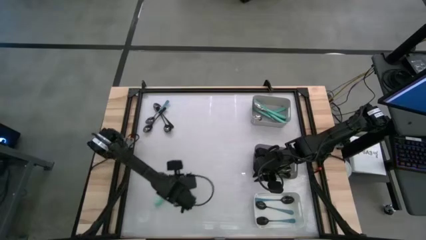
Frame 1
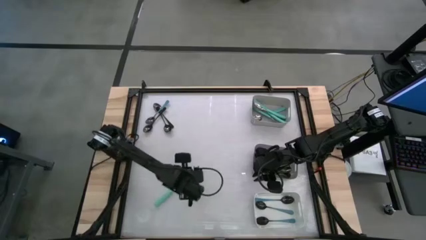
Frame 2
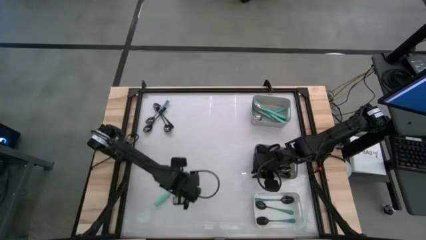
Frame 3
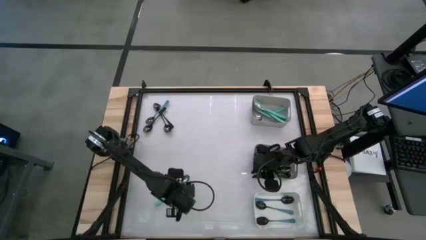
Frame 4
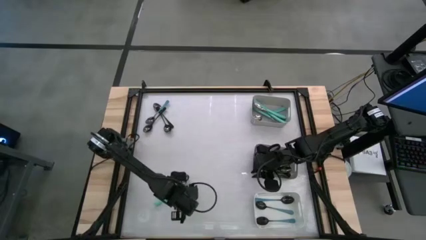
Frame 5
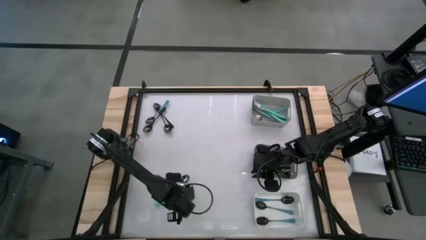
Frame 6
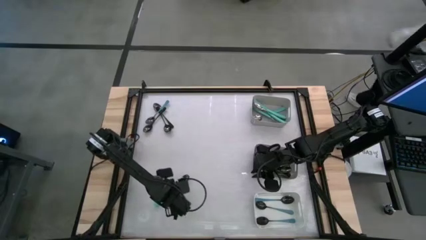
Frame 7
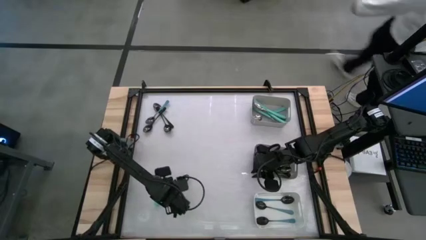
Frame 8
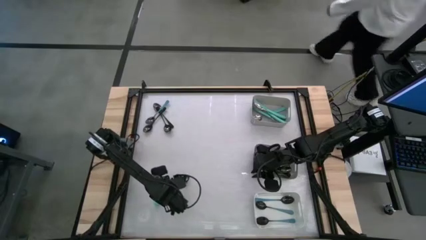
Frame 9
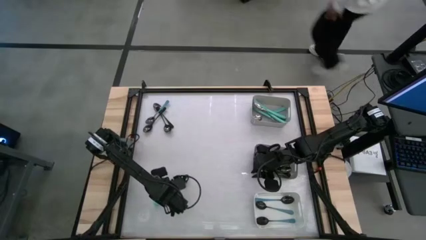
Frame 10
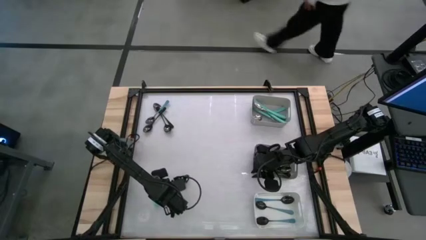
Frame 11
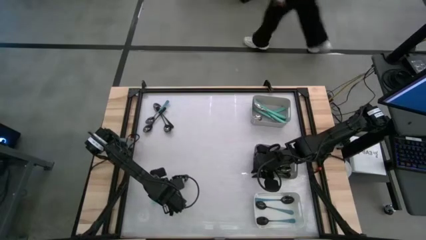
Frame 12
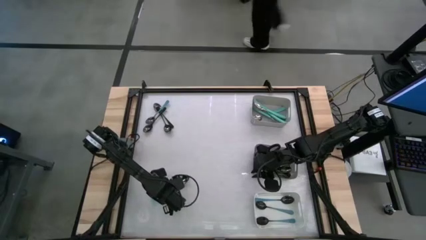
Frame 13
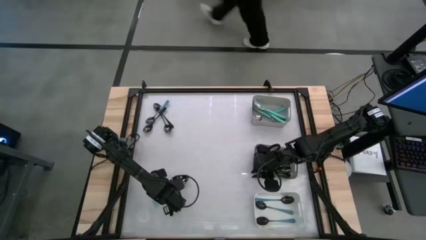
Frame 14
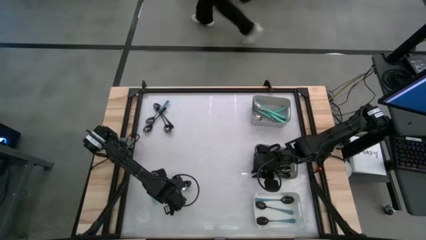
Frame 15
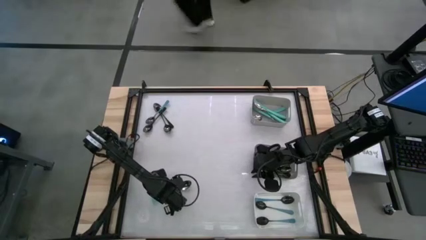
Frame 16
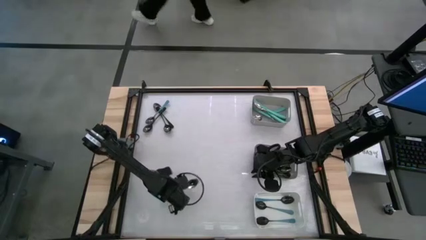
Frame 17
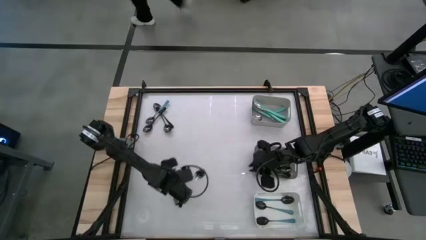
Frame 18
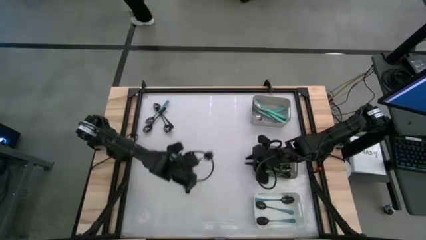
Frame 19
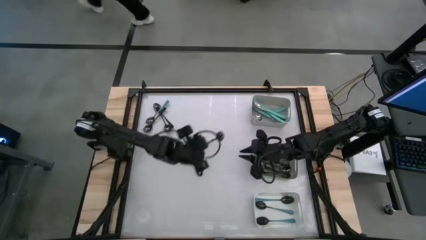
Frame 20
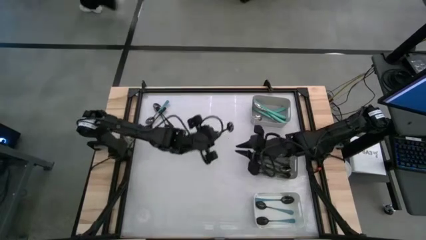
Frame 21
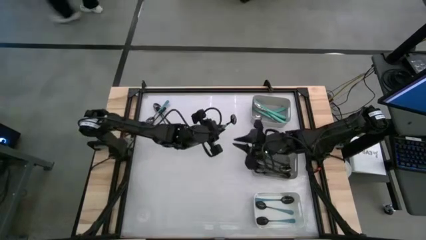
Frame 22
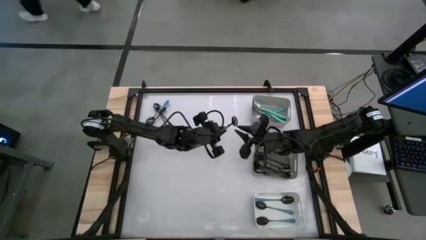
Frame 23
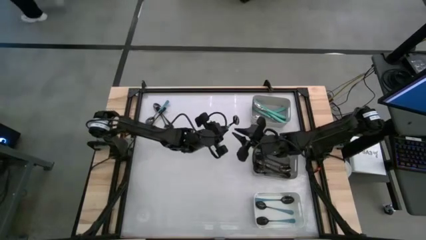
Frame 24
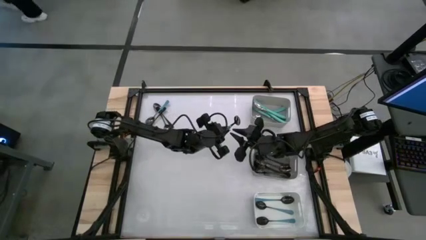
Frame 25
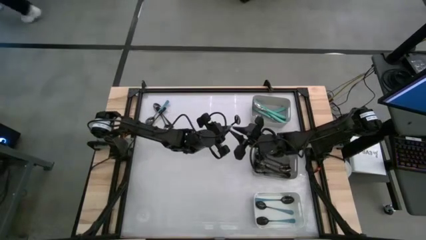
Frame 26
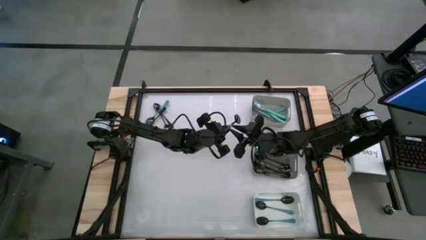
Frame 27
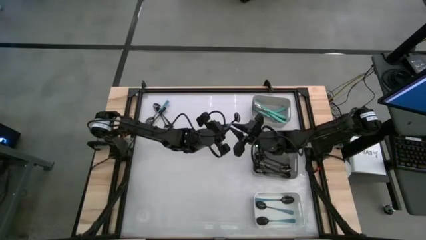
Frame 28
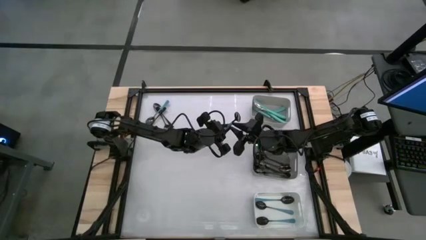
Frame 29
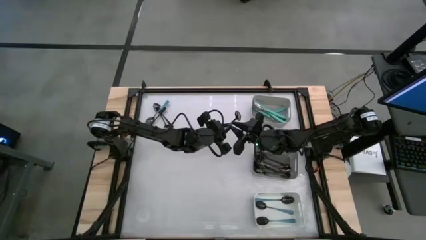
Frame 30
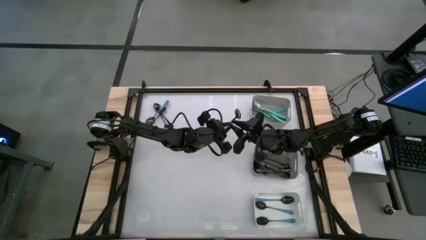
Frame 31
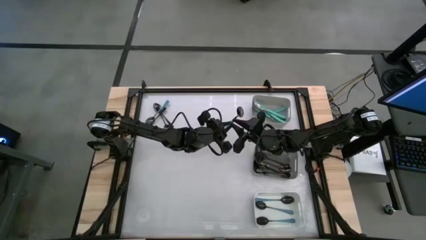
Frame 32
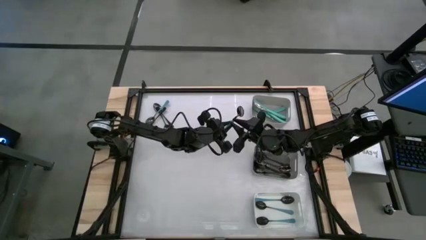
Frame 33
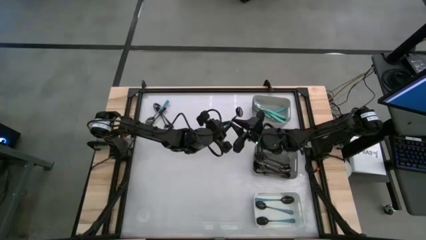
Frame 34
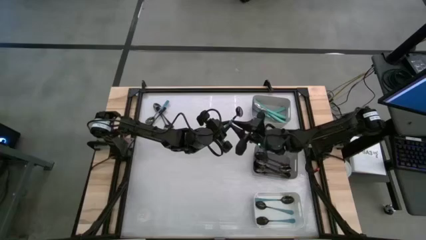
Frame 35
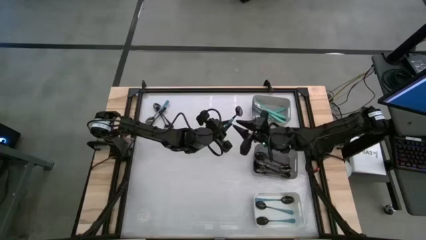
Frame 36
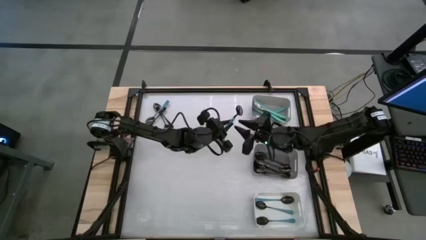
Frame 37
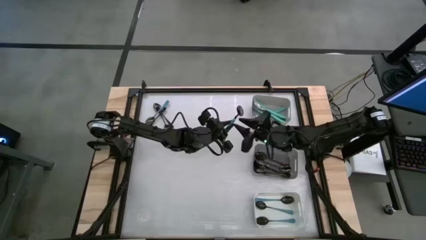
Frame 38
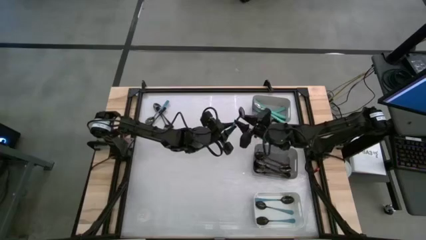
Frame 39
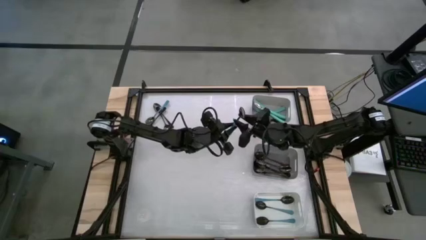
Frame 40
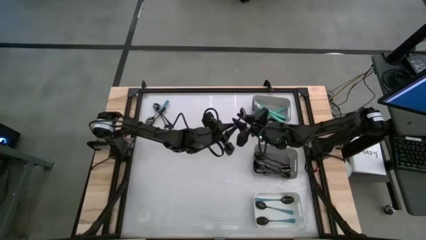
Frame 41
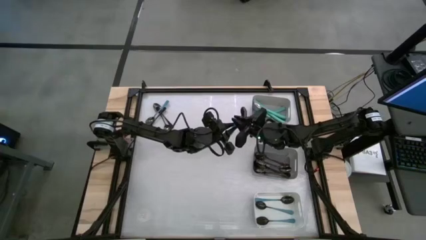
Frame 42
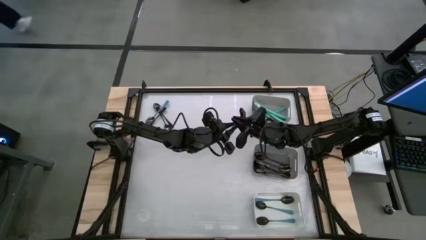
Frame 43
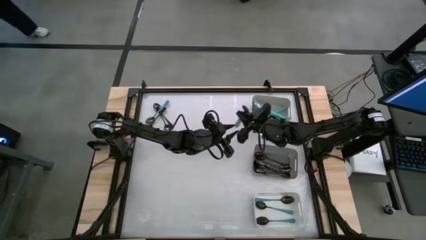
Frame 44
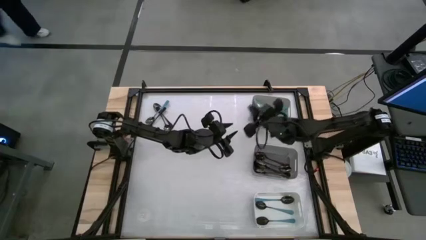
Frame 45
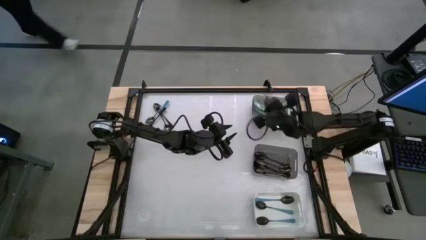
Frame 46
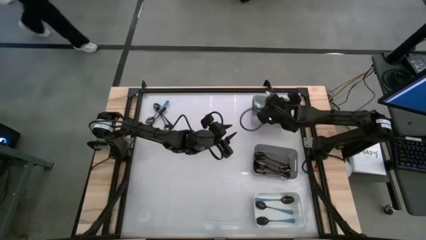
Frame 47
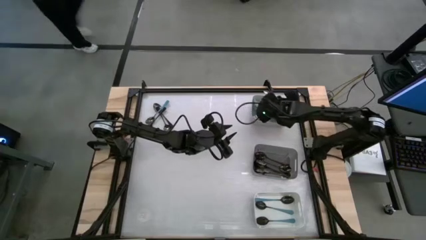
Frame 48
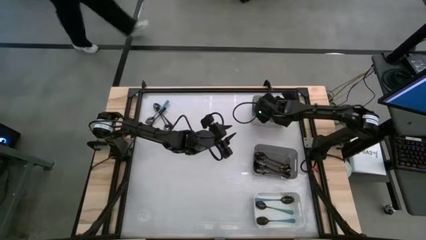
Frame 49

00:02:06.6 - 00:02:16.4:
Task: Sort silverware by color (type)
Put the light blue spoon into the gray bin

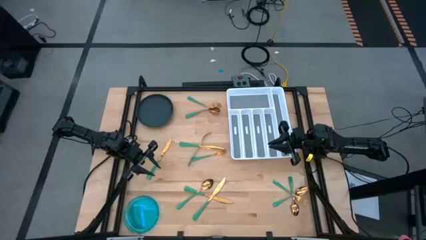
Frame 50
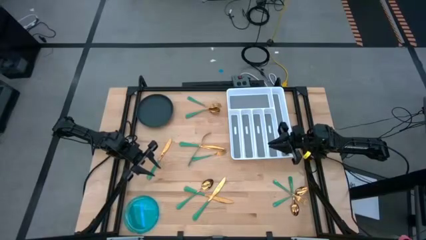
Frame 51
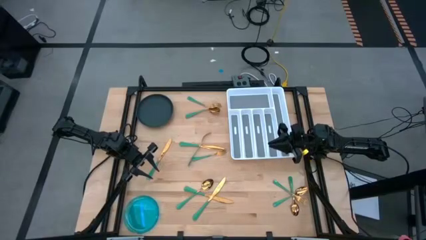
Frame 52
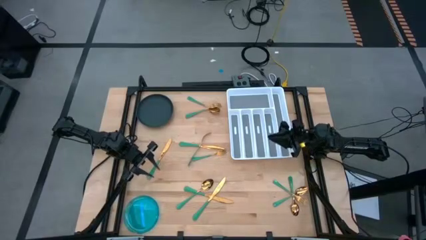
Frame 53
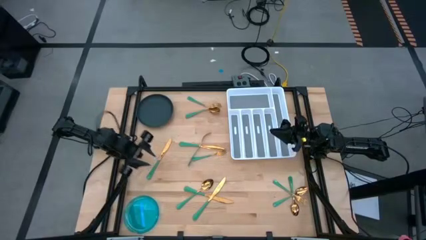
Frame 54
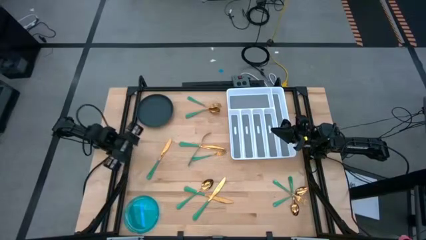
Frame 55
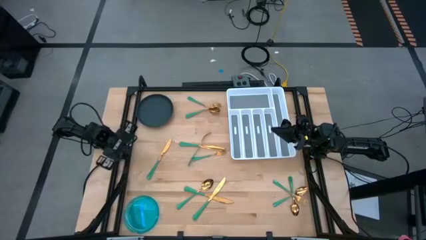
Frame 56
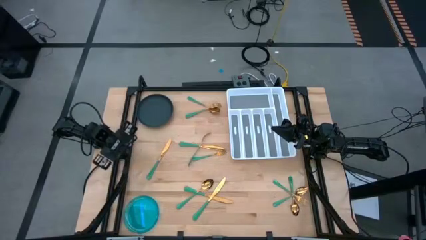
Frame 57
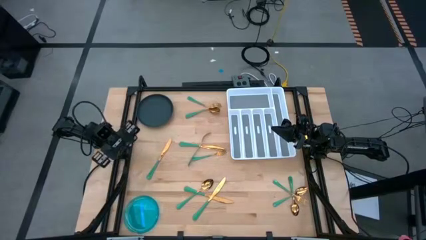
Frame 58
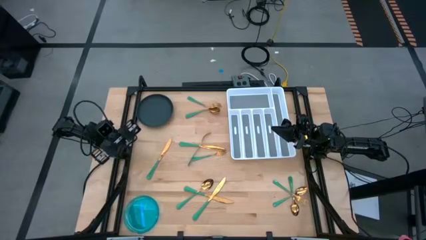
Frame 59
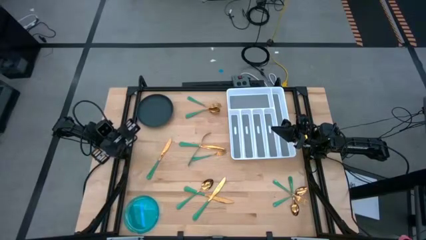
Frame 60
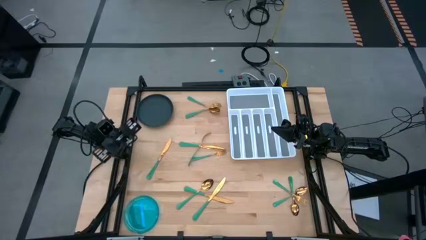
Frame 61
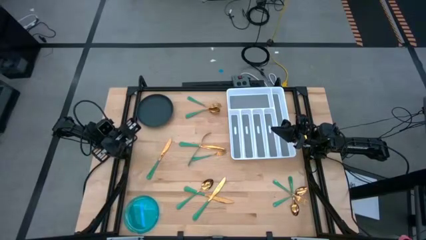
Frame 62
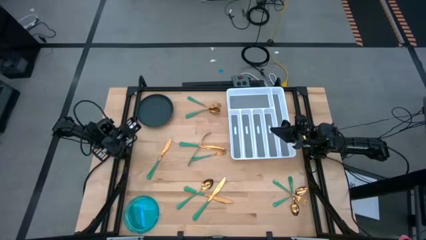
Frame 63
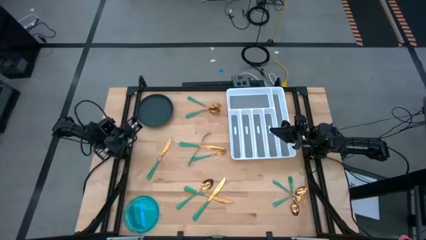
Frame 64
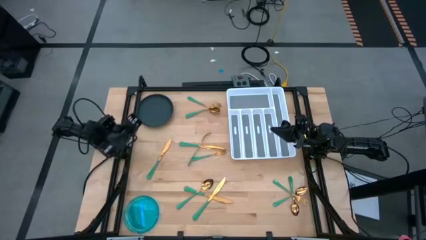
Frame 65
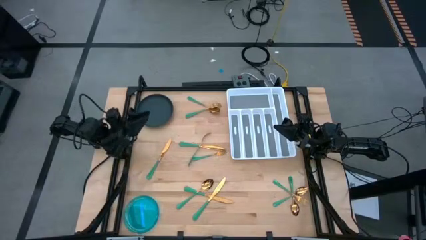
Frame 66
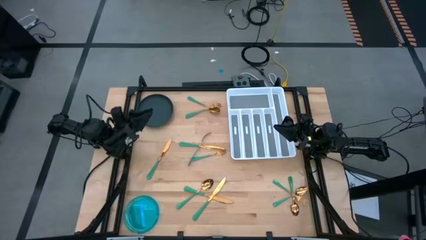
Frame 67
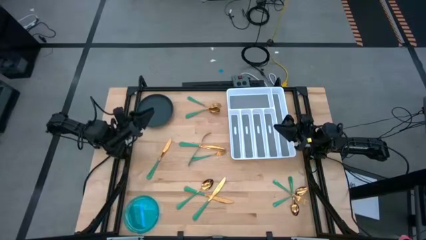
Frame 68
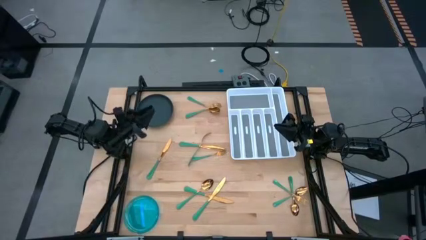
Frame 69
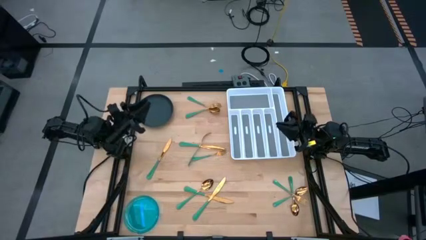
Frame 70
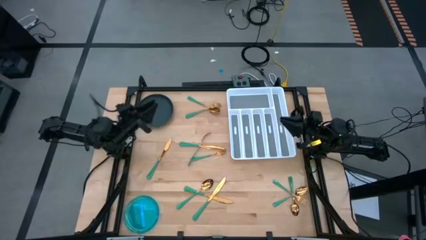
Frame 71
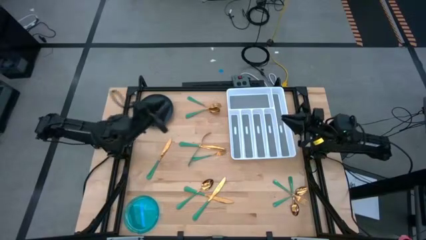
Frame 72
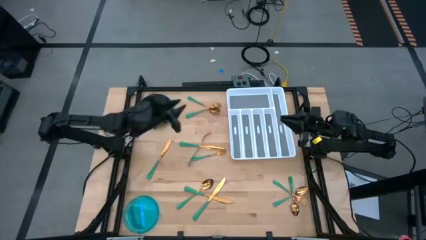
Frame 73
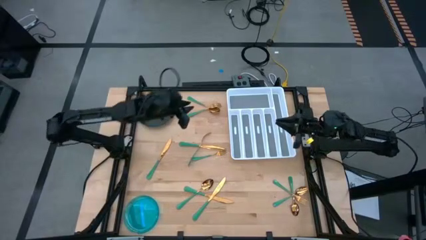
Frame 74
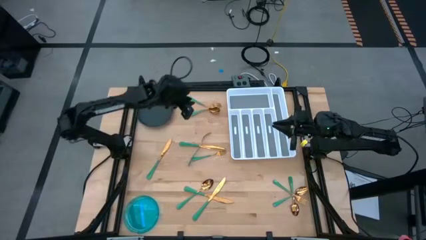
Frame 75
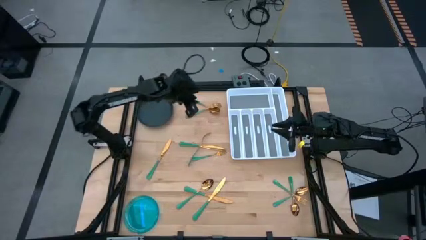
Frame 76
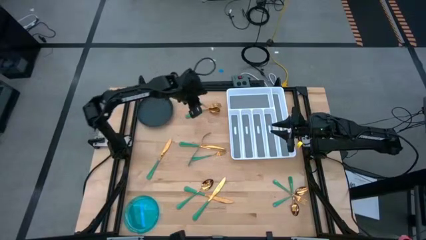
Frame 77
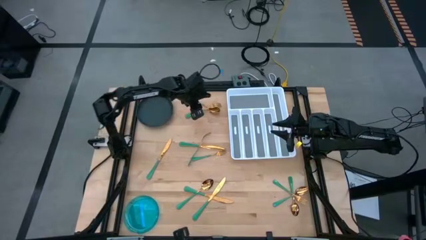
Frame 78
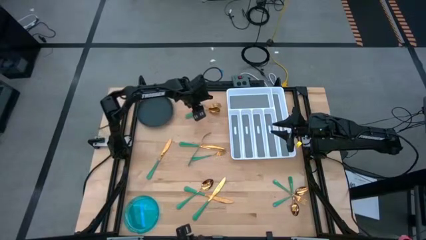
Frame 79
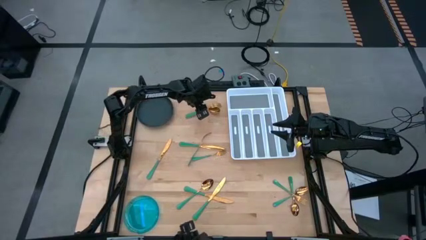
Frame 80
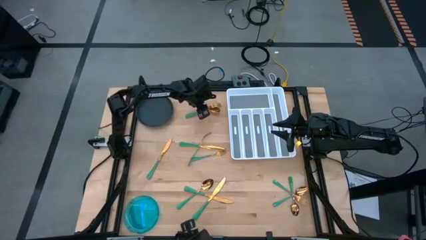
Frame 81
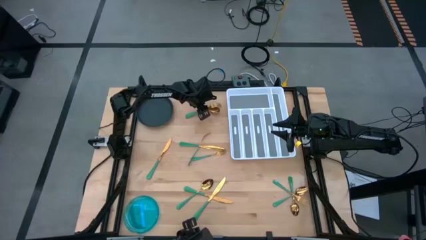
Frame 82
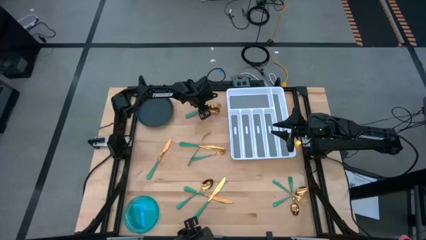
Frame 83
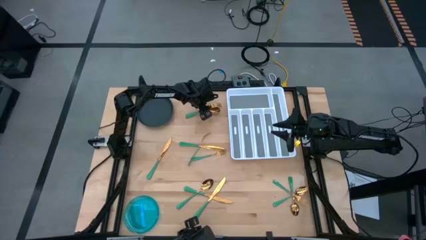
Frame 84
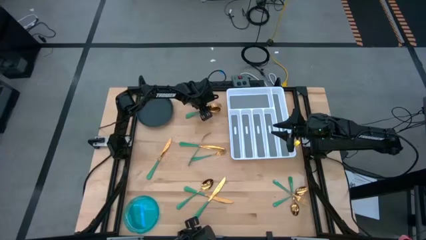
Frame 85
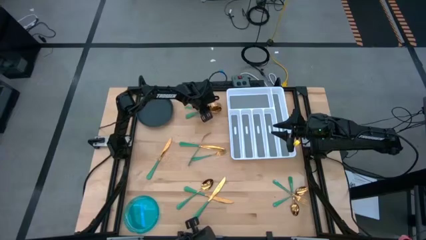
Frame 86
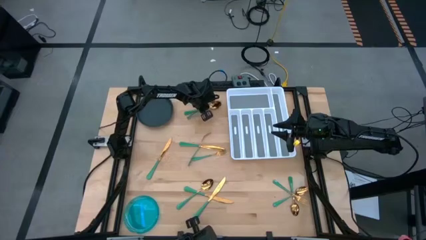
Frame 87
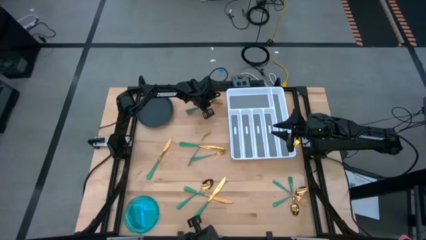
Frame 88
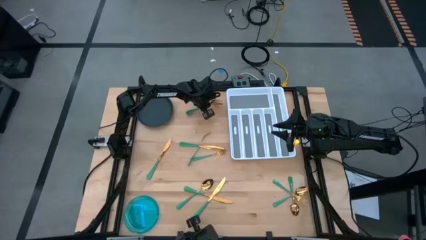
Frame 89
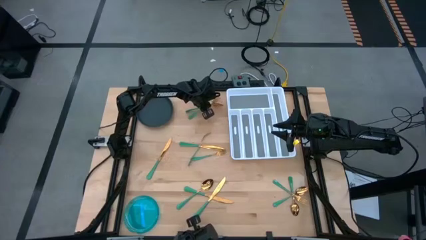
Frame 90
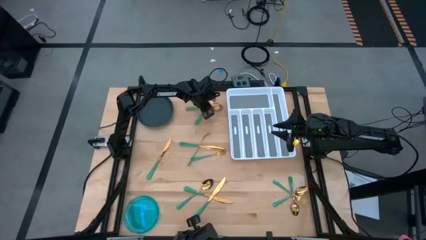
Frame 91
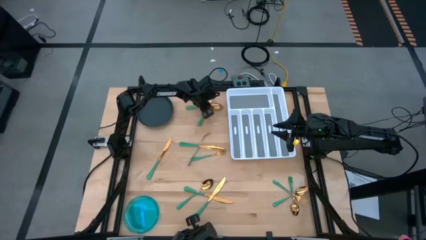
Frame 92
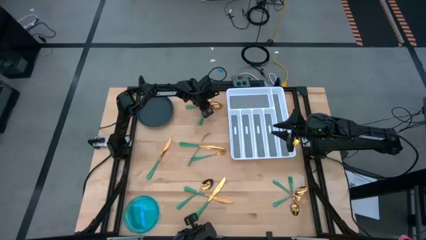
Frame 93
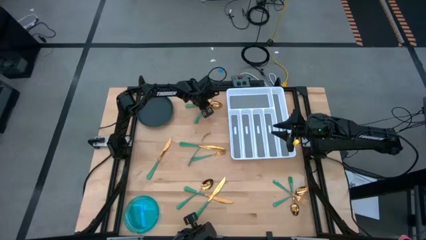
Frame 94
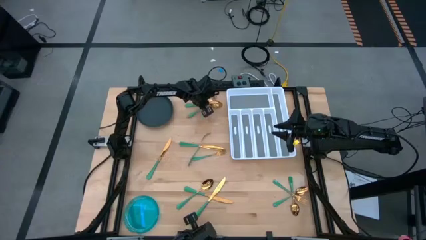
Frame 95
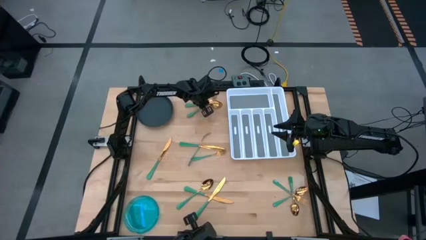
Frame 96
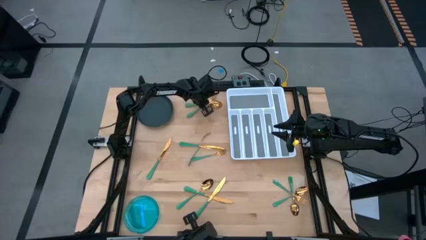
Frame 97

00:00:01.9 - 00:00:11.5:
Task: Sort silverware
Put the green fork into the silverware tray
